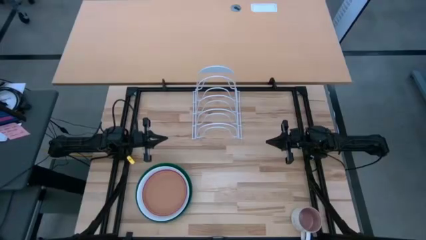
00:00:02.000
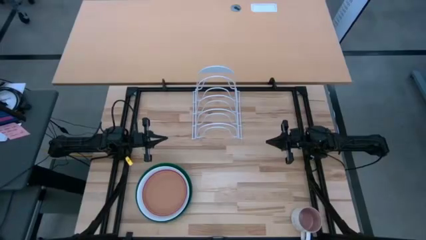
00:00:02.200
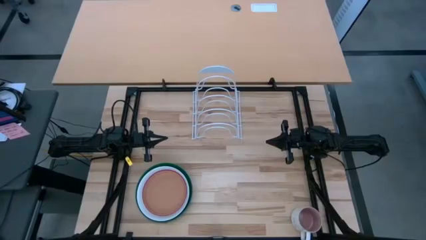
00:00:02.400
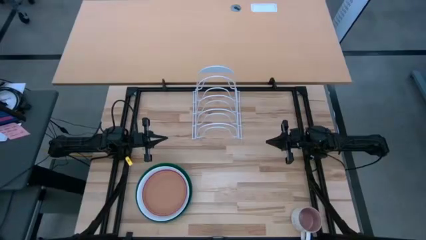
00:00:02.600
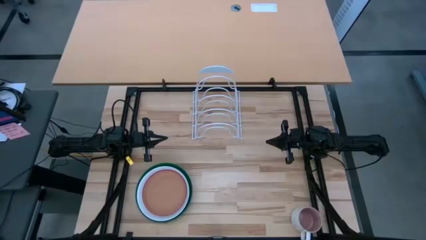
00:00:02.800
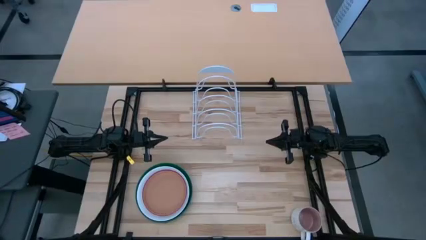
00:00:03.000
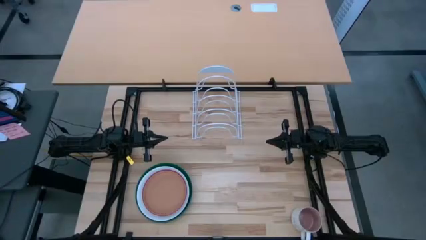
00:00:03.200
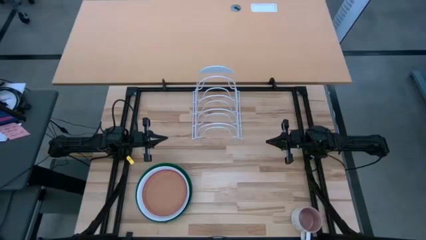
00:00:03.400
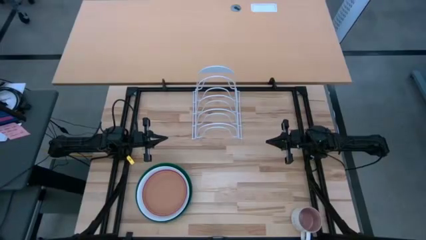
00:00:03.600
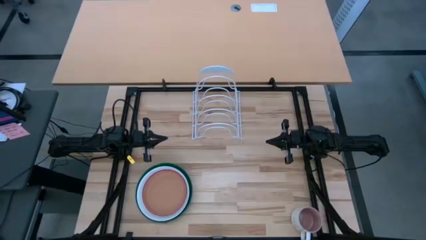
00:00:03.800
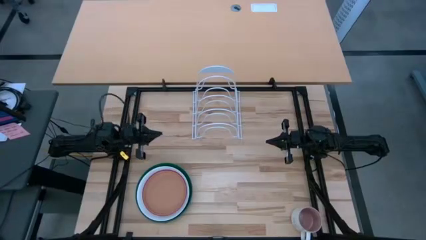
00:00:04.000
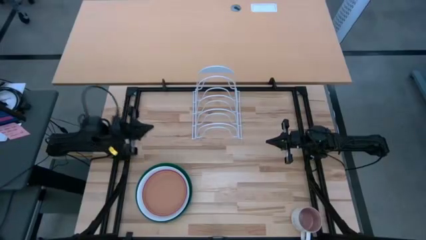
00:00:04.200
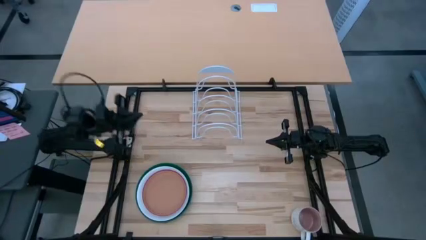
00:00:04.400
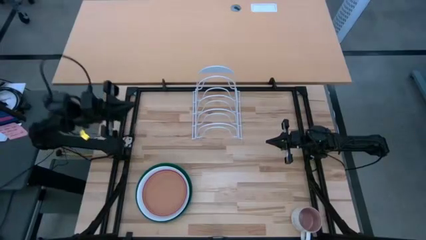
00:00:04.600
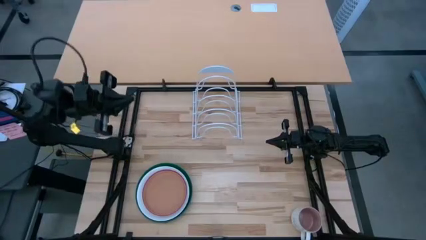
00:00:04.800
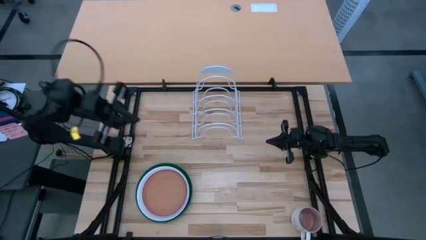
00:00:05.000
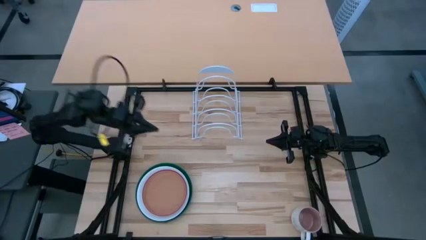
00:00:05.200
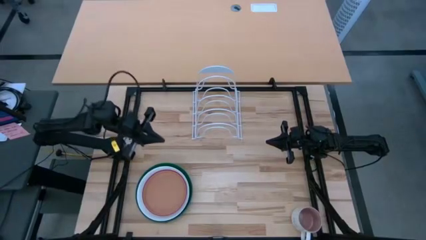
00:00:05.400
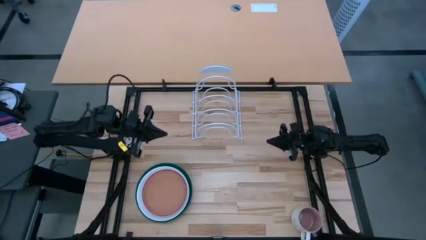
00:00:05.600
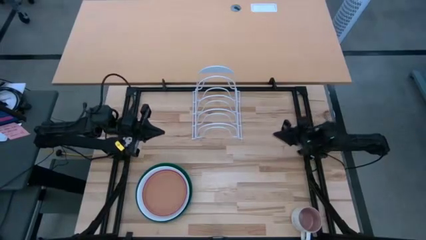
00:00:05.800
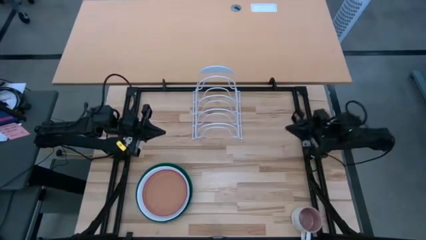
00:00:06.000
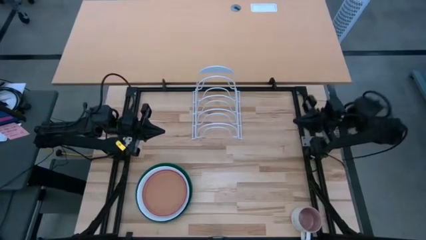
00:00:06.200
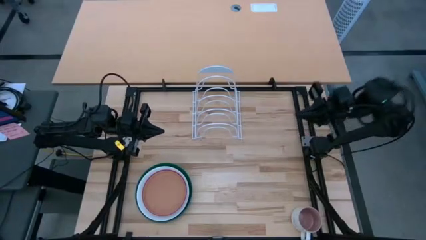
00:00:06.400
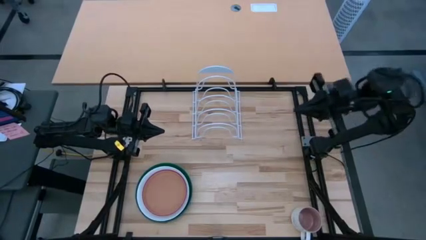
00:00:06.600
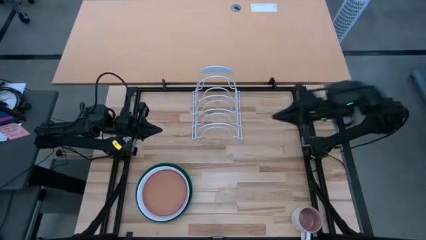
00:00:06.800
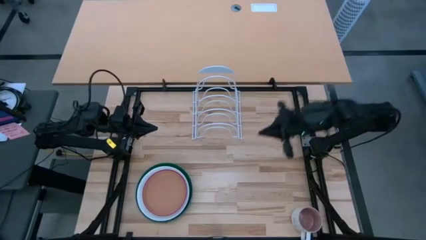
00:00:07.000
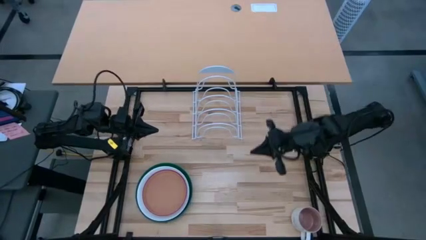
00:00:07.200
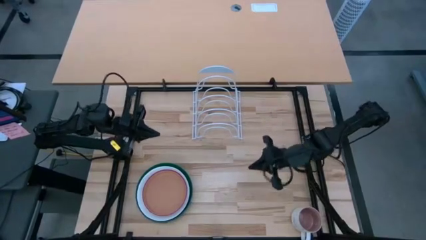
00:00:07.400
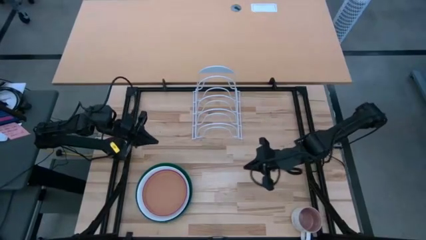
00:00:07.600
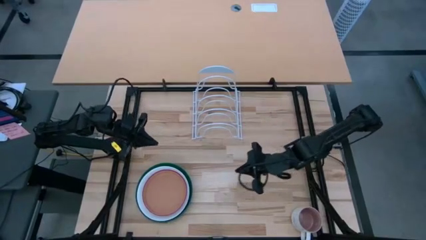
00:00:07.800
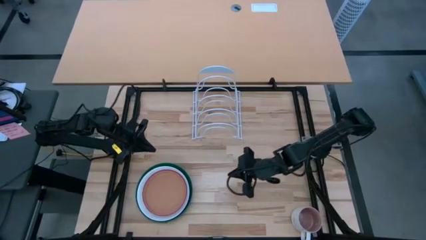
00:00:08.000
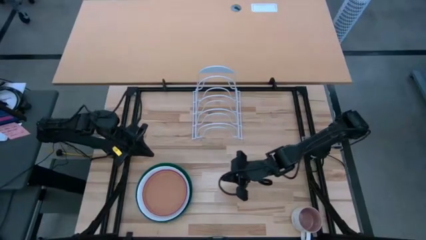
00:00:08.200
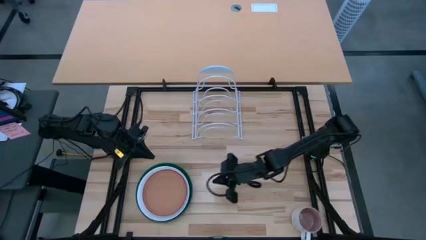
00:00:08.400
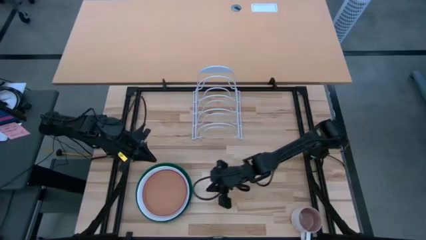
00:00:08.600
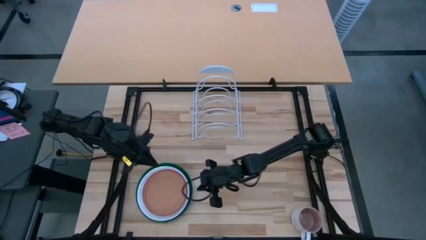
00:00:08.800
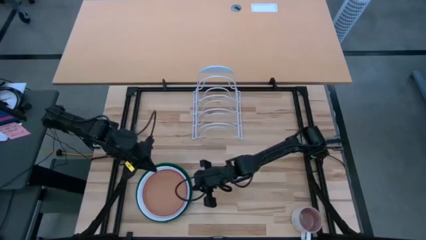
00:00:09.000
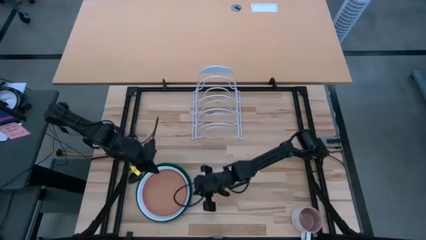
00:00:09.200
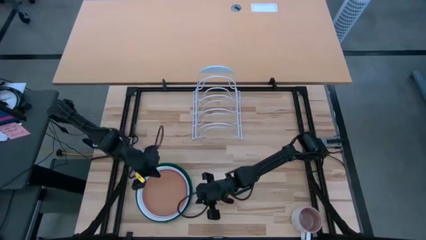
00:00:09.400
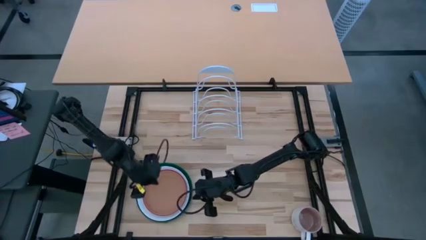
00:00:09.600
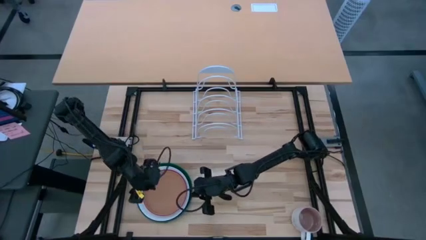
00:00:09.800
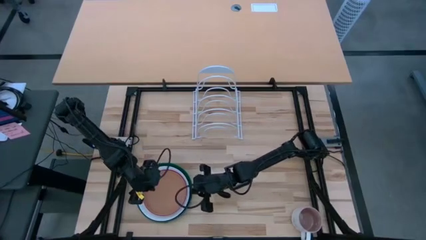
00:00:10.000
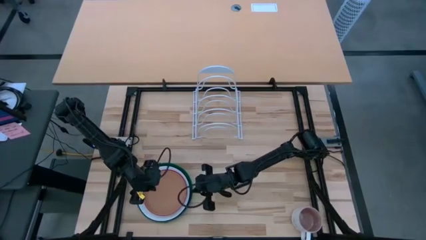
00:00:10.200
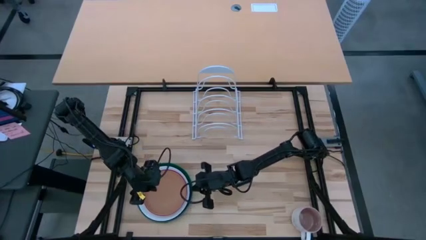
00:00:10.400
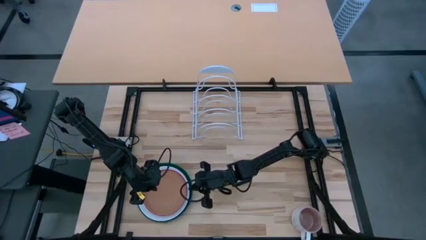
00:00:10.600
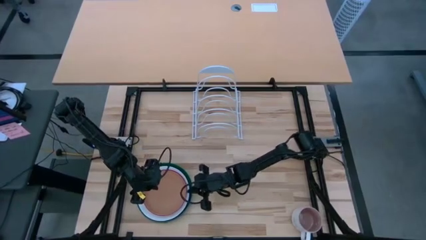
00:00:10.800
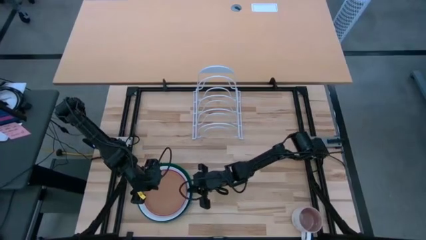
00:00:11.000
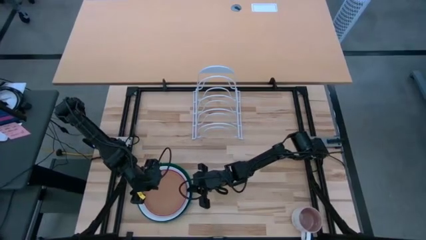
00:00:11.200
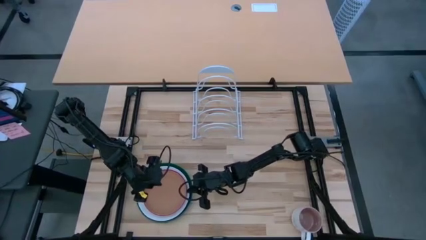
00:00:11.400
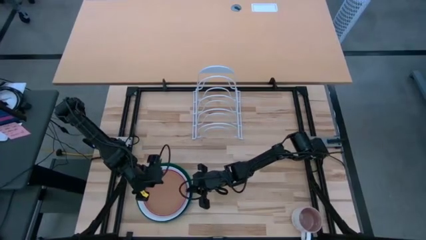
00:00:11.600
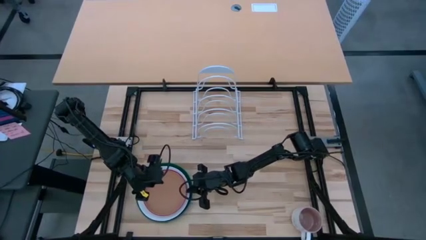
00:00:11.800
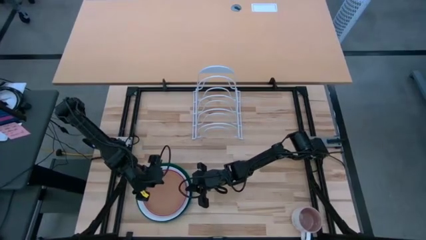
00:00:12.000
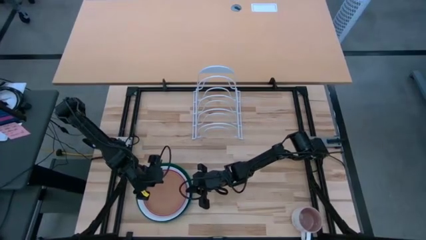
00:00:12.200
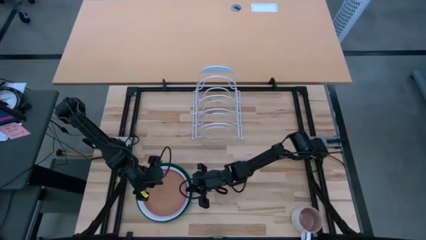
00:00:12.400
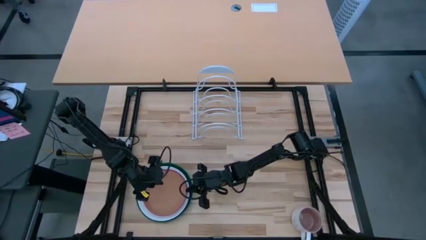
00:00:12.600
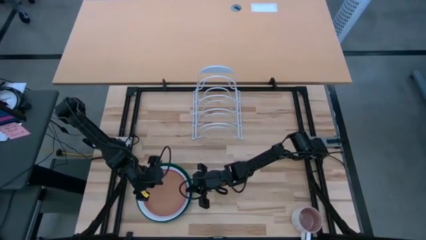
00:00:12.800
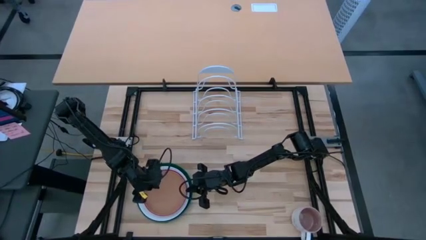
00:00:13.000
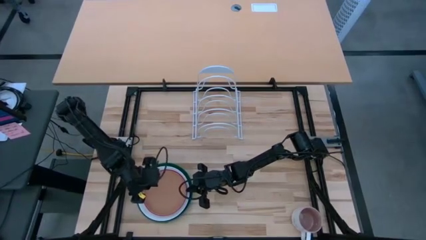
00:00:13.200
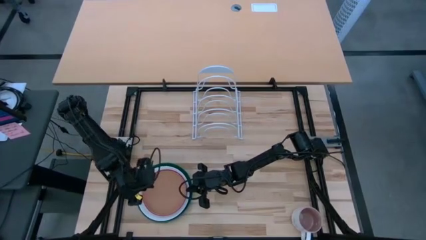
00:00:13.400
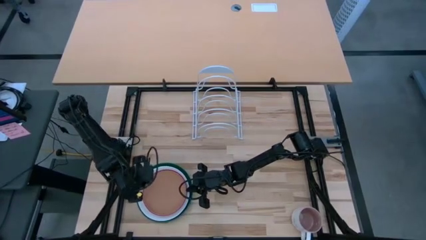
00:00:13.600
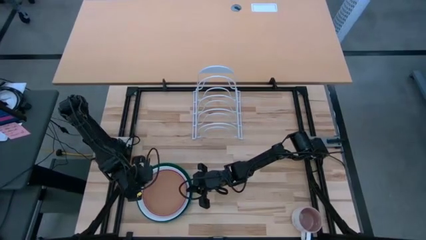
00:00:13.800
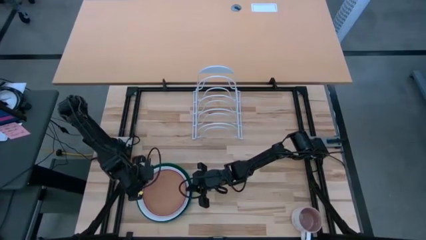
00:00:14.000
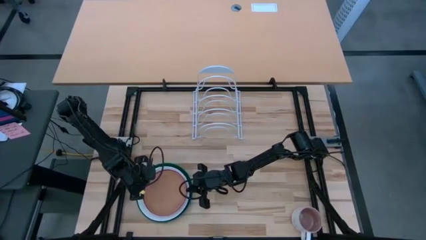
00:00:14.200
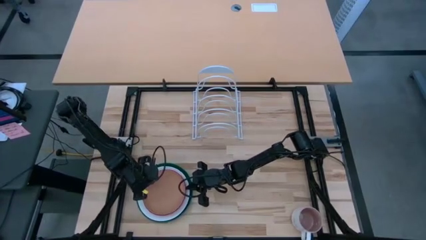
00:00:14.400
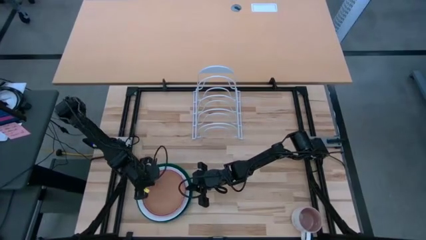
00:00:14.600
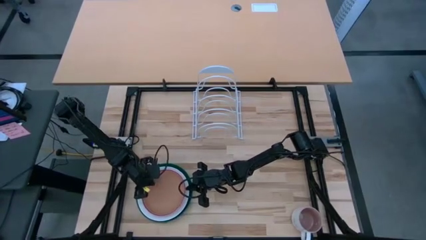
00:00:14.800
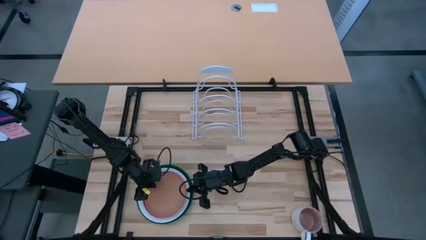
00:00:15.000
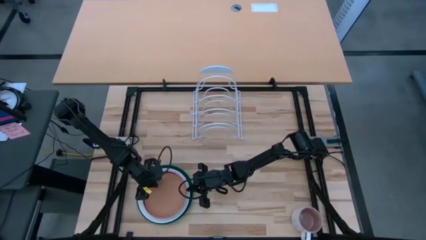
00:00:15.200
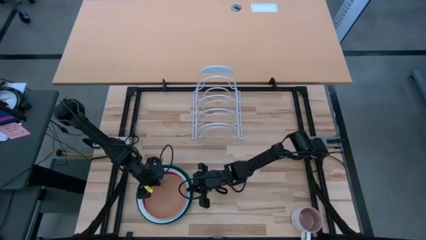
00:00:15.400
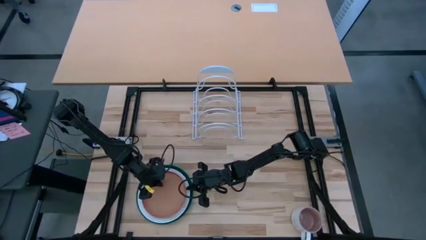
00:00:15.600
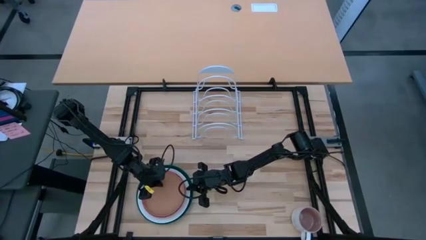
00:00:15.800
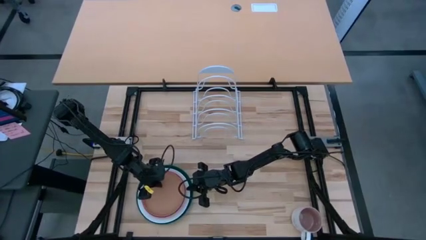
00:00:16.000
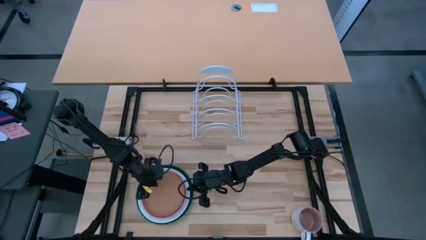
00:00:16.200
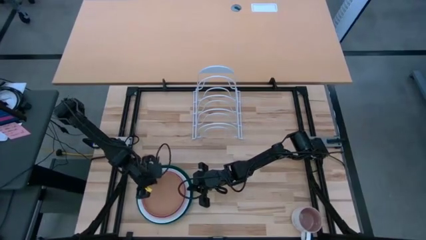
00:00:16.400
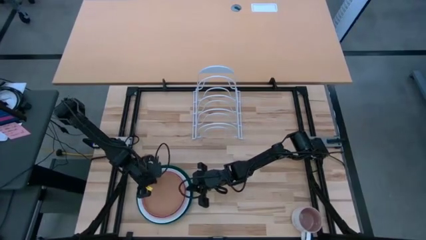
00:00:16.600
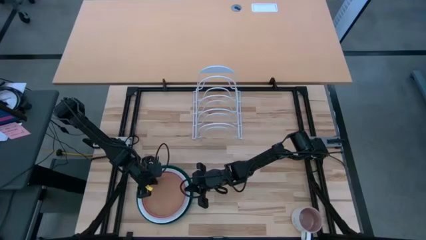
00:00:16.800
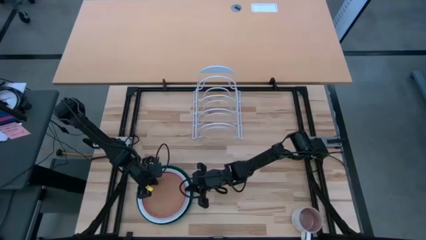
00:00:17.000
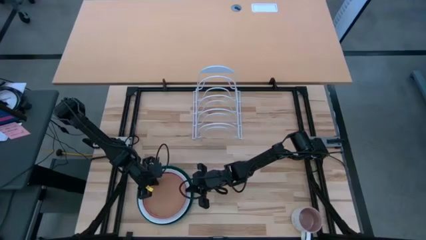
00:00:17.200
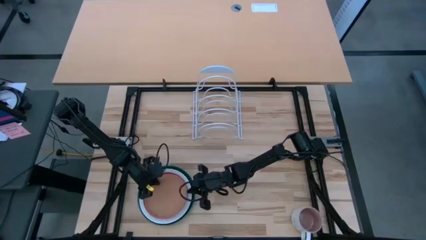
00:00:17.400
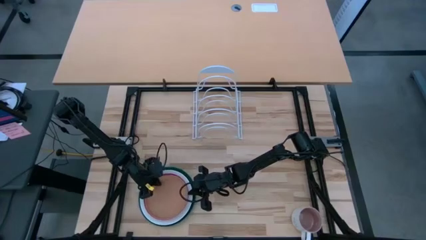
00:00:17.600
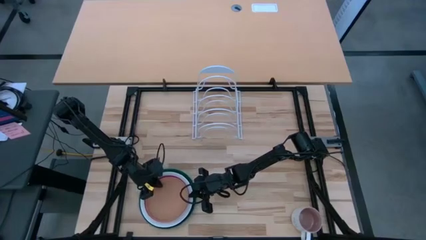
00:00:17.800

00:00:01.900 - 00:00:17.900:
Task: Sort dishes
Put the orange plate on the dish rack
